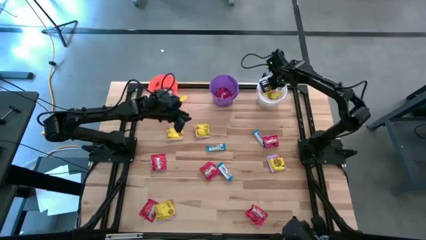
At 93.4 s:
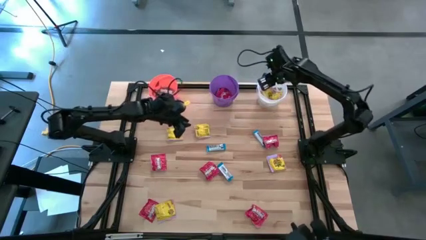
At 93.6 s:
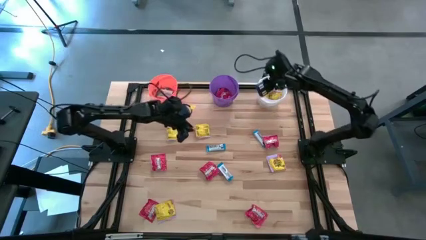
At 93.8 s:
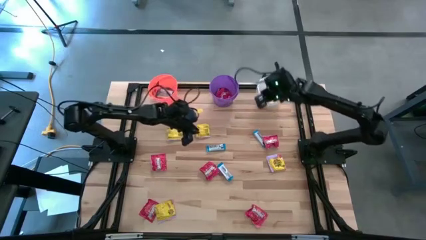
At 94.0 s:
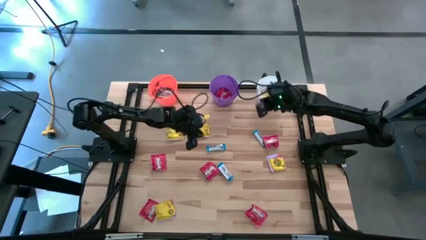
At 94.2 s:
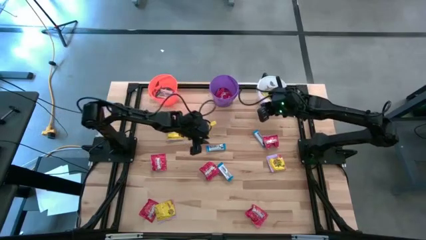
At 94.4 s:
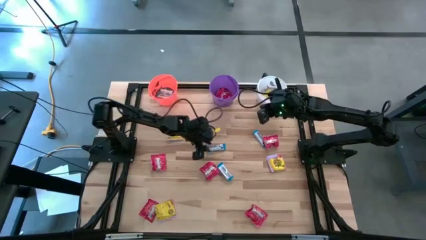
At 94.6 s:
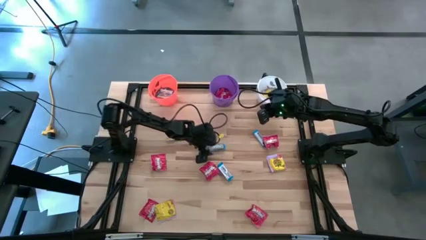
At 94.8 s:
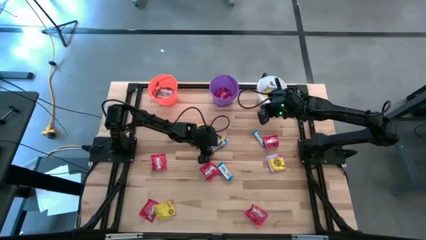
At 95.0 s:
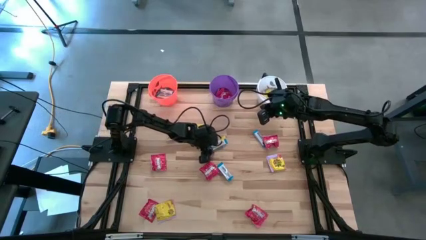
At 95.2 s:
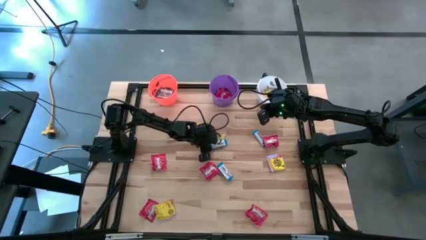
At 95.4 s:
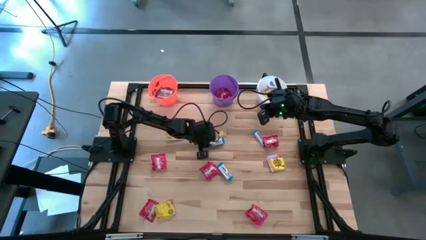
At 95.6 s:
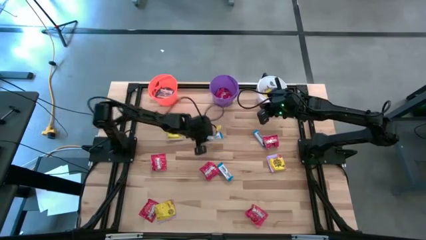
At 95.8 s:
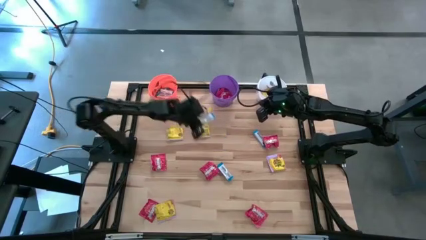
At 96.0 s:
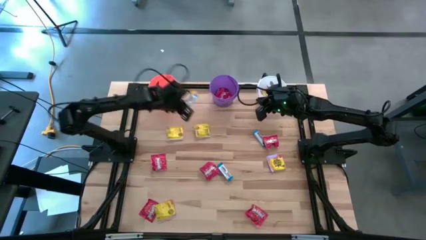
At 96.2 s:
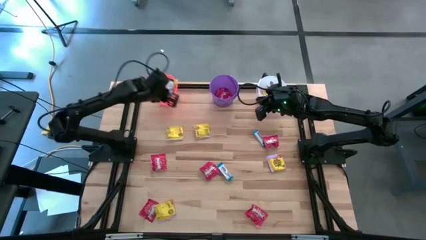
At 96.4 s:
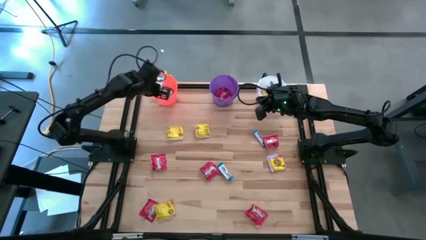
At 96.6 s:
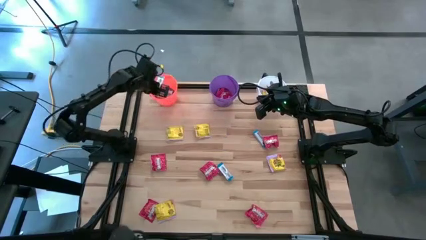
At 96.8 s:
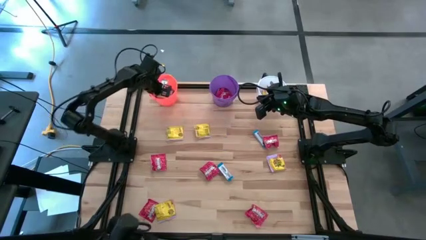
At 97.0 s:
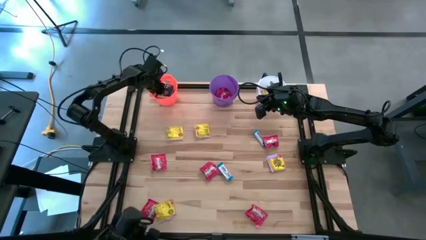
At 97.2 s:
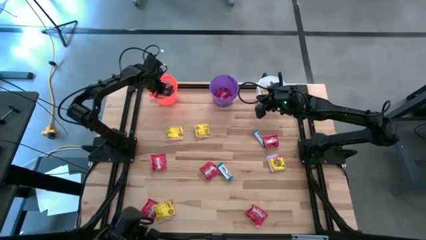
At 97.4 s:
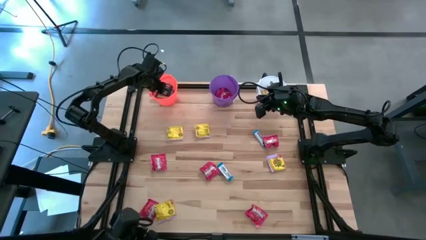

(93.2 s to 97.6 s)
Task: Sort candy
Put the white chocolate bar into the orange bucket

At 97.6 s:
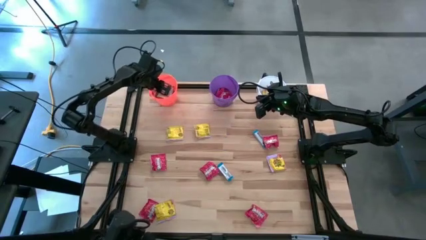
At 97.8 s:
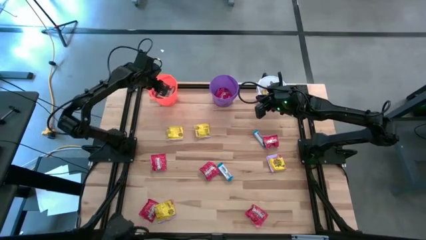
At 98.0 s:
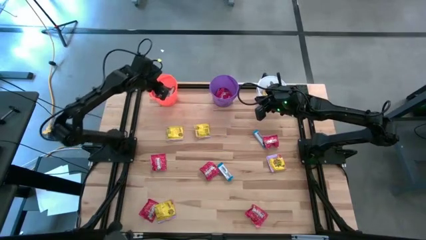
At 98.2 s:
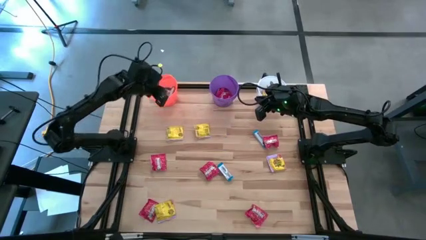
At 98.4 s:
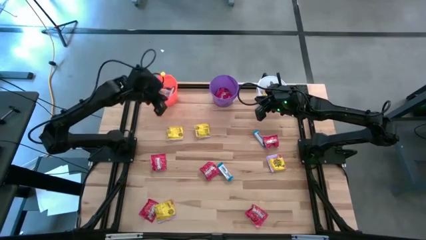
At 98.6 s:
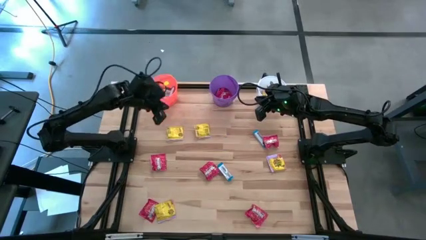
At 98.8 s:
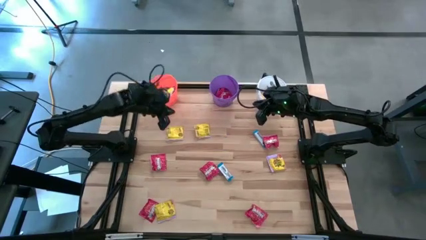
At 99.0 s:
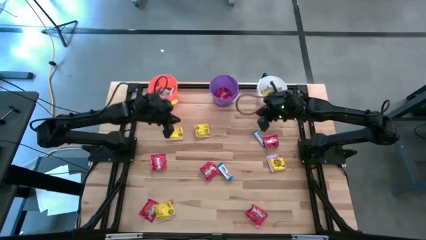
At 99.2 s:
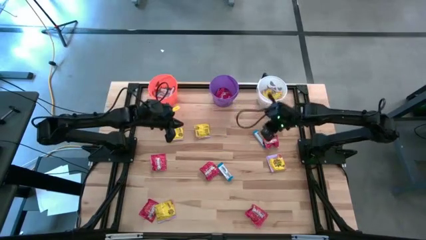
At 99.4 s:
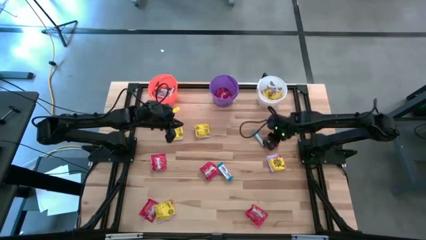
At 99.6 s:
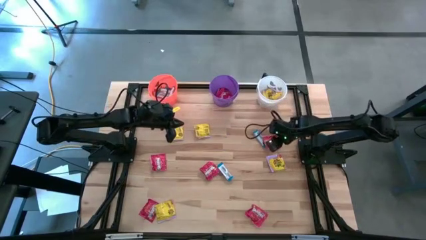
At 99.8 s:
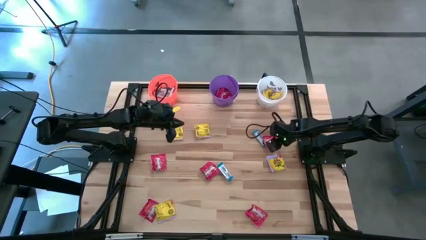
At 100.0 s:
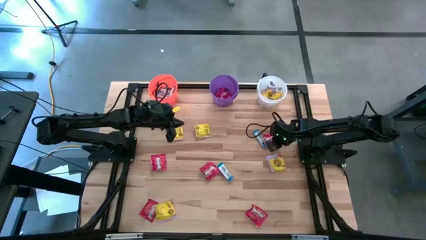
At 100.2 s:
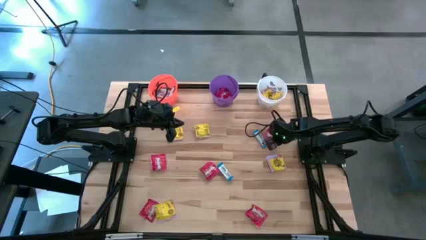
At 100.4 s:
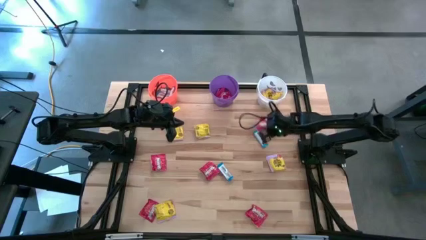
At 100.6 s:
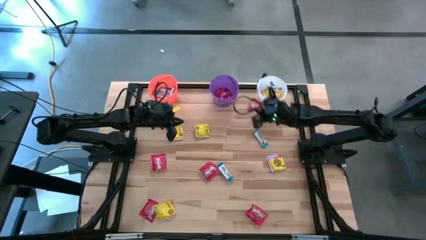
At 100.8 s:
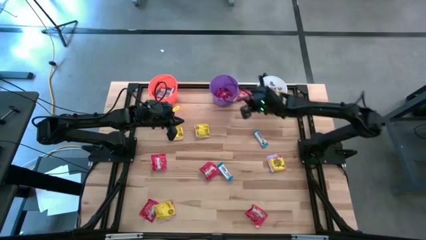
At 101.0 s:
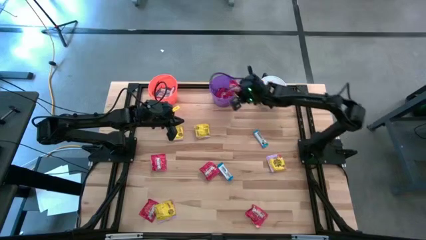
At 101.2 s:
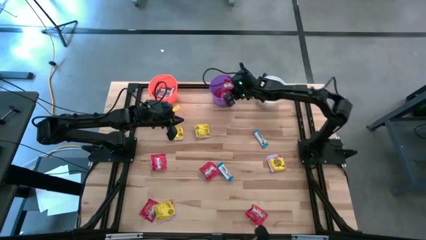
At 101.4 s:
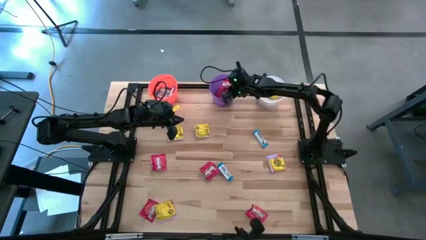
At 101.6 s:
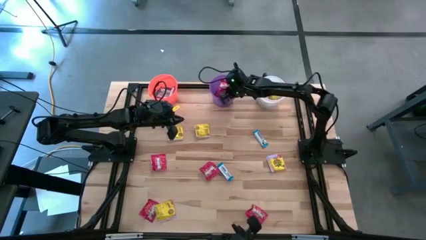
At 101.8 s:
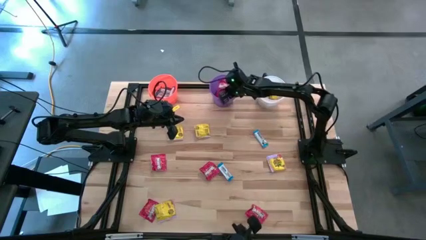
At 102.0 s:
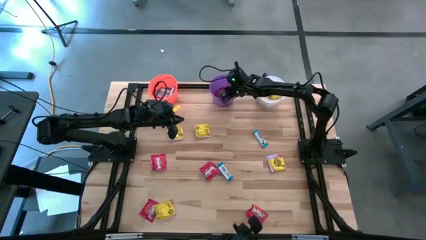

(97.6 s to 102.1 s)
Put the red candy into the purple bucket

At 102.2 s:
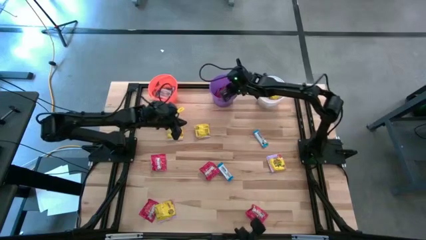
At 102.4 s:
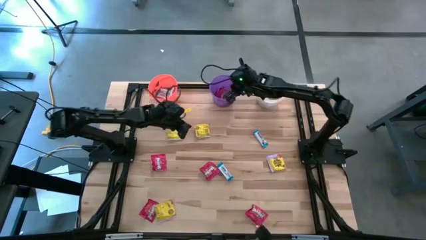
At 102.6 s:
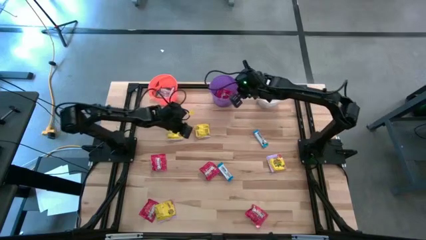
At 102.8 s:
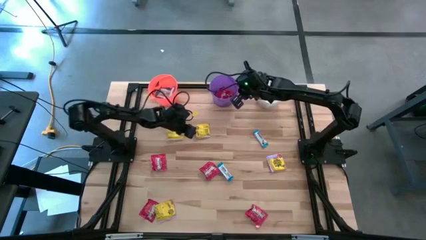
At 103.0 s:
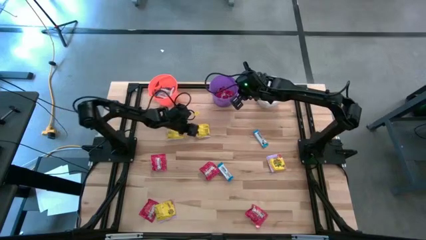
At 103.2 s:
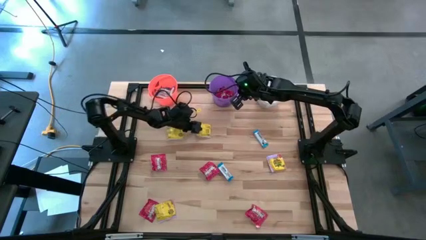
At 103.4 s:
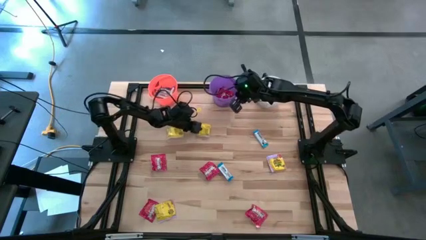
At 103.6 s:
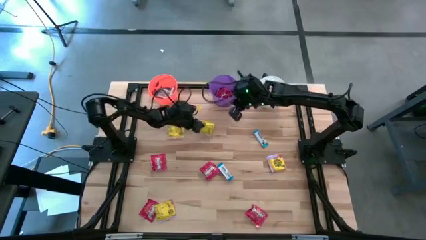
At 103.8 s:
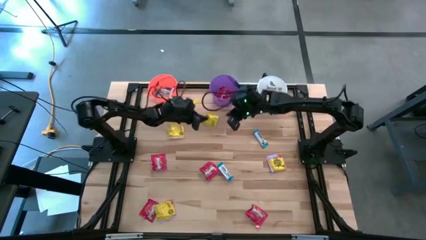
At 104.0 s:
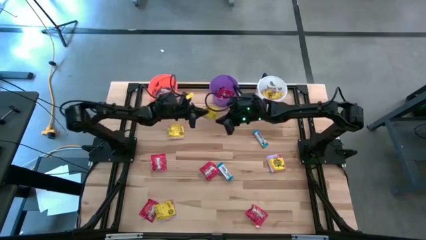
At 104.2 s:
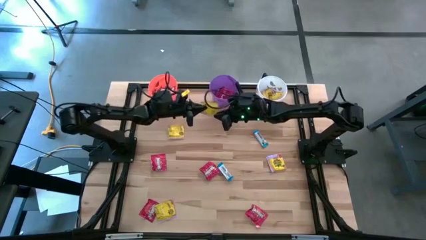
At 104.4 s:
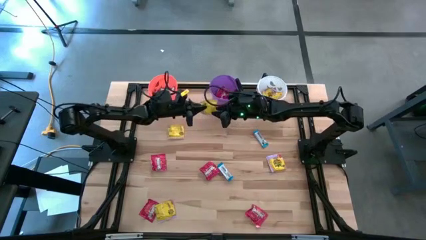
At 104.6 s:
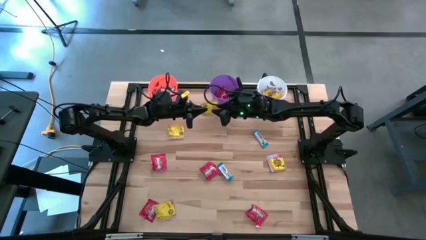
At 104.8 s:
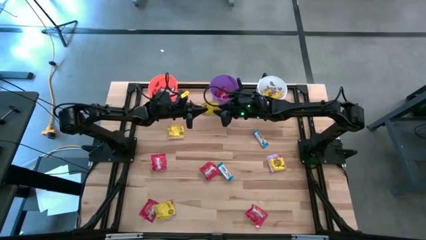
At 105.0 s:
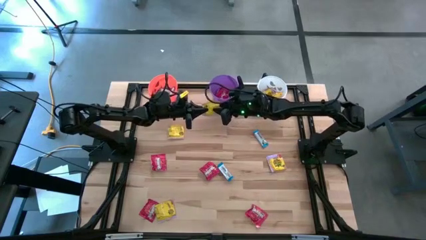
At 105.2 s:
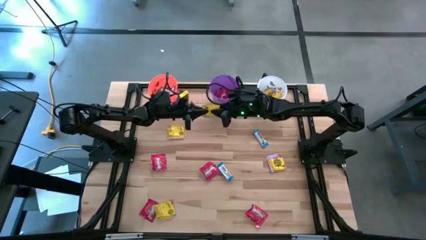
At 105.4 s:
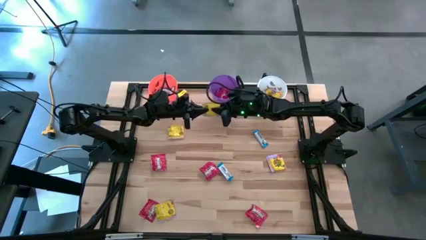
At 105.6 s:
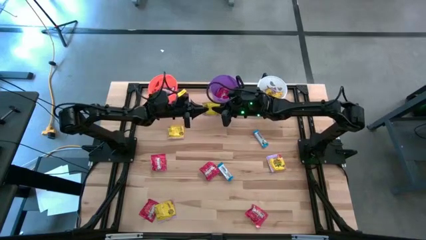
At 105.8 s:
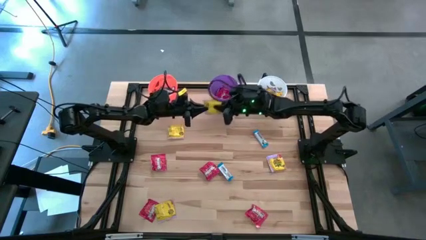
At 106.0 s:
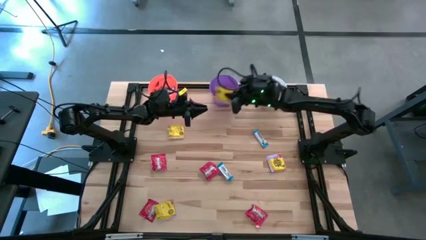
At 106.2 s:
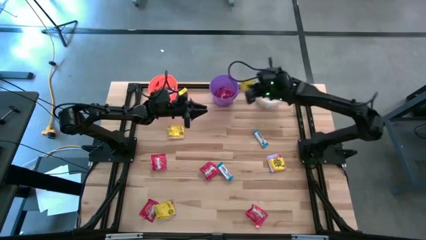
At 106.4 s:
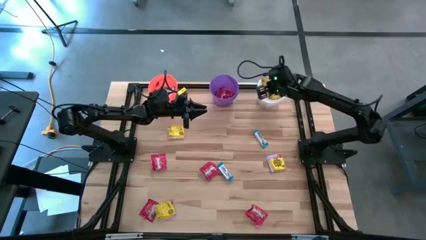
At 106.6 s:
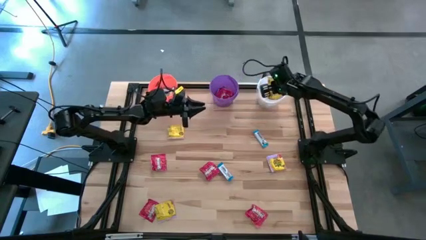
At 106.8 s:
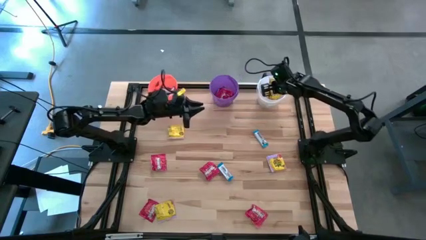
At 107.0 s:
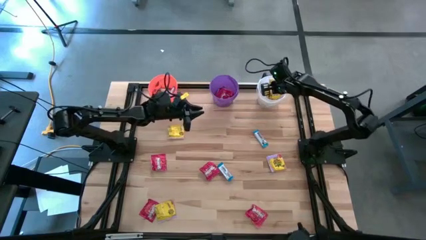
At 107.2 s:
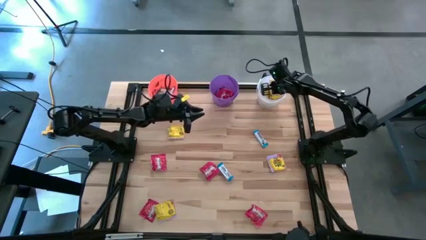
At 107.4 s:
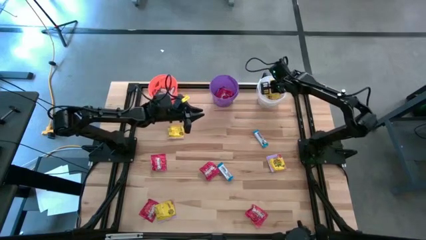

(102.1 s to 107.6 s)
Put the yellow candy into the white bucket

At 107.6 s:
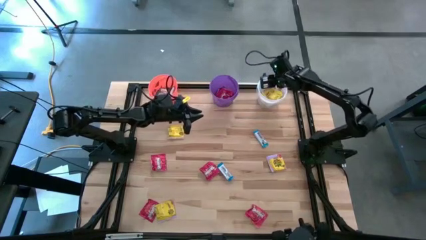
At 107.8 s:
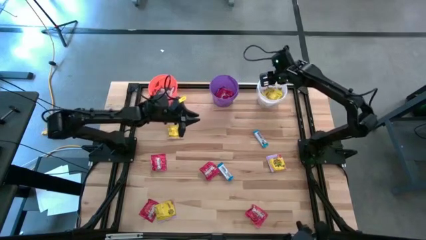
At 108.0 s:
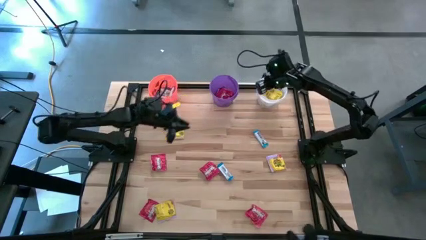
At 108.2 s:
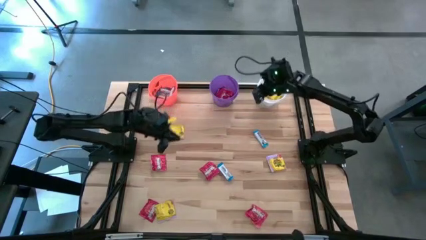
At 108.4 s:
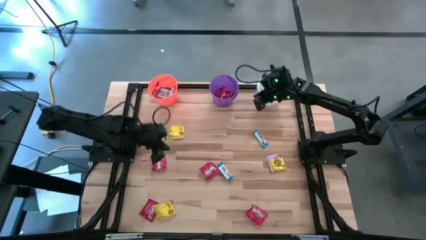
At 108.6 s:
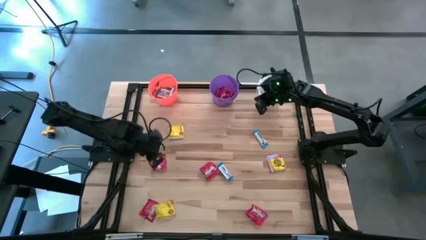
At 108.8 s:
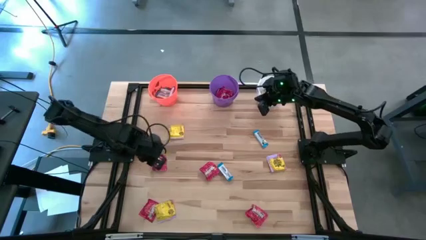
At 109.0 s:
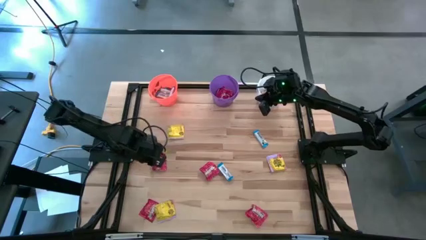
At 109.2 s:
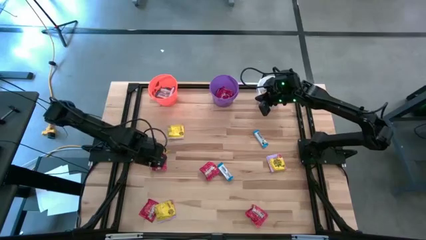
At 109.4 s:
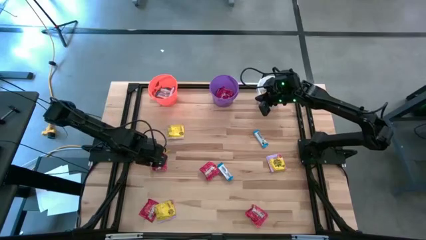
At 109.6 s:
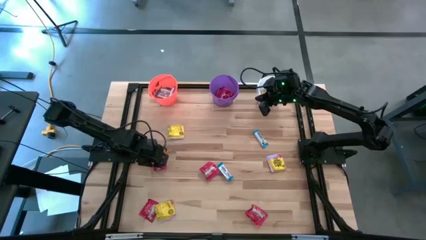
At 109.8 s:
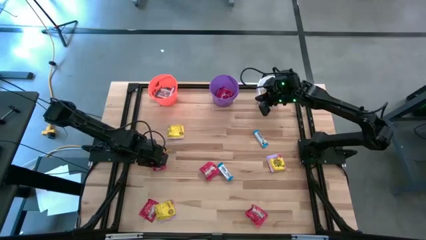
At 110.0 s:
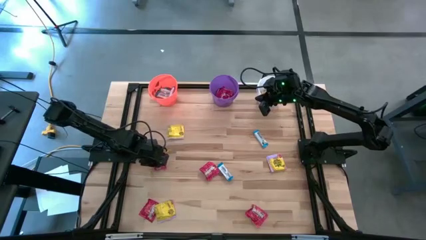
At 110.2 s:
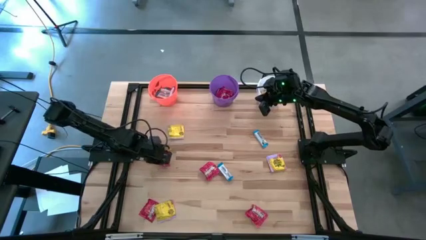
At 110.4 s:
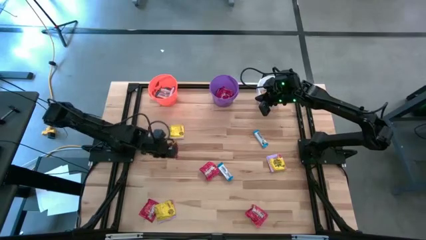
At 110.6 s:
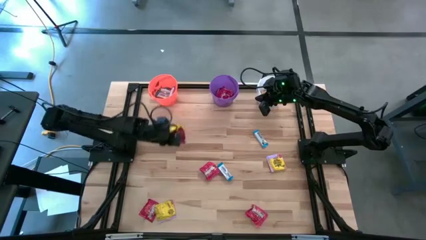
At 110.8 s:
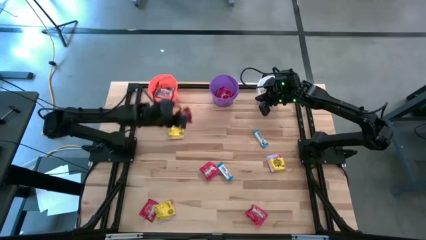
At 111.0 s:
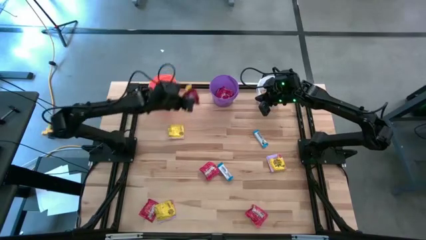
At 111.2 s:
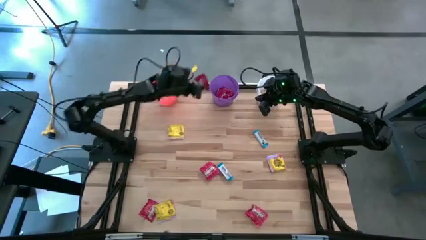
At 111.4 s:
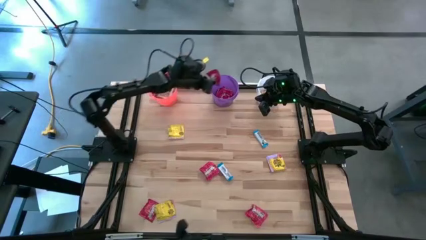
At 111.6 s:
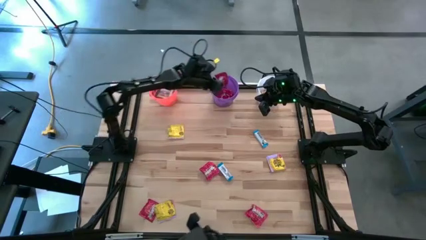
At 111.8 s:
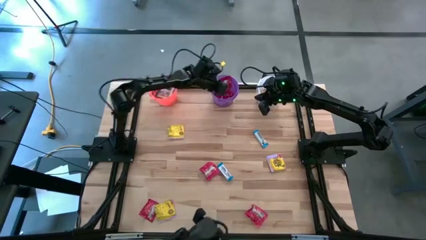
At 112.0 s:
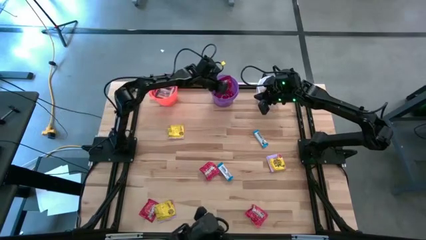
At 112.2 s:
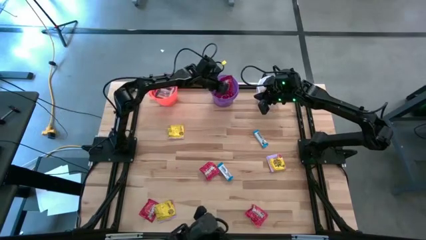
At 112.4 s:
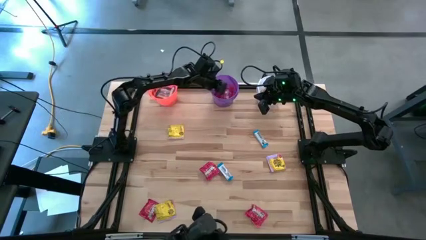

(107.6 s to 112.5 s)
Put the red candy into the purple bucket
